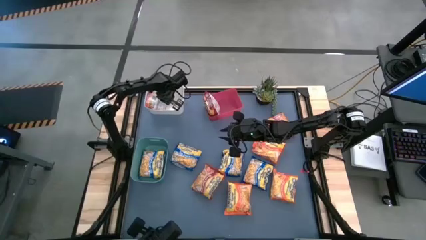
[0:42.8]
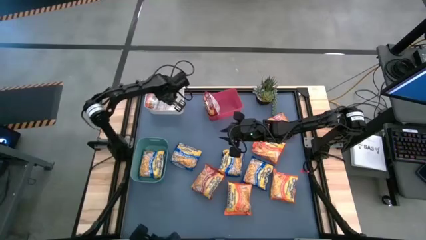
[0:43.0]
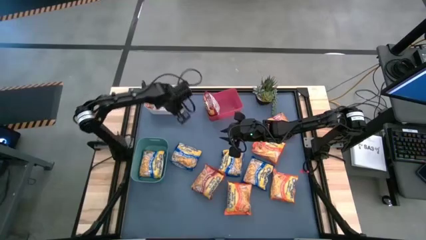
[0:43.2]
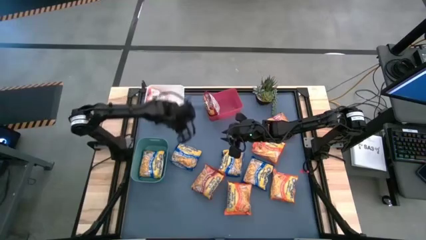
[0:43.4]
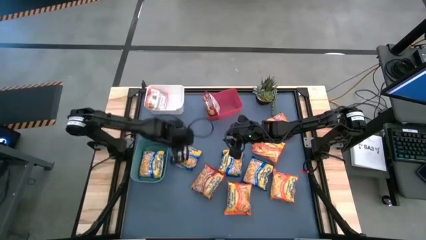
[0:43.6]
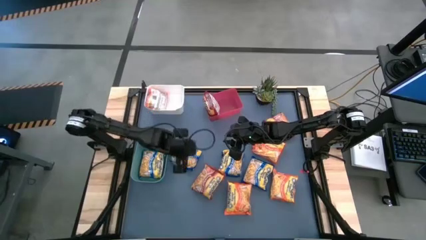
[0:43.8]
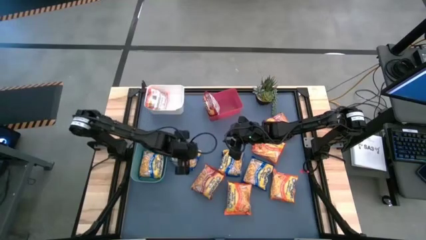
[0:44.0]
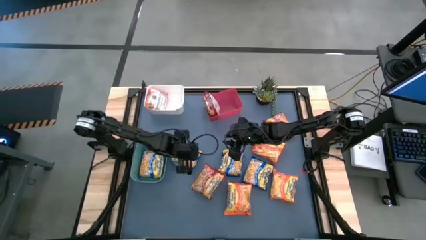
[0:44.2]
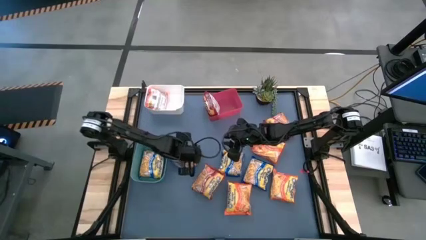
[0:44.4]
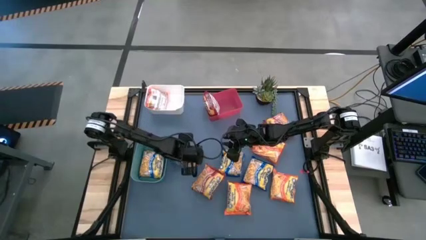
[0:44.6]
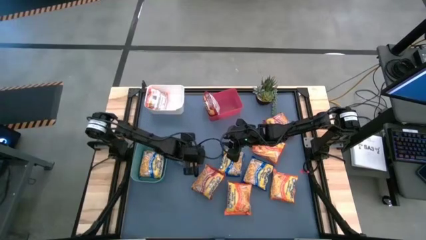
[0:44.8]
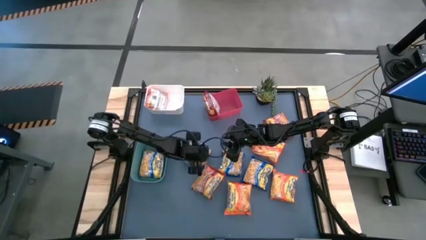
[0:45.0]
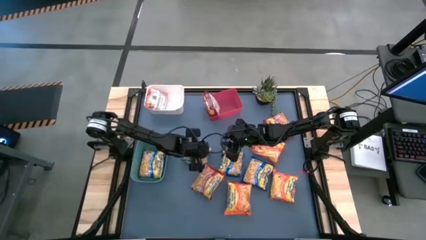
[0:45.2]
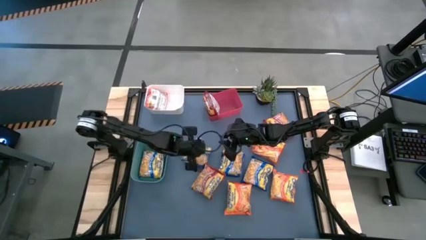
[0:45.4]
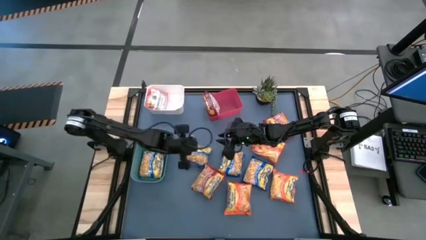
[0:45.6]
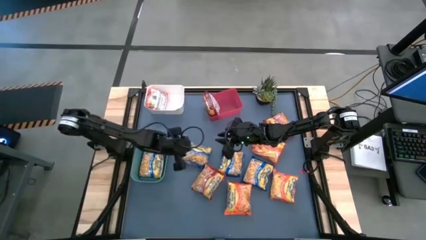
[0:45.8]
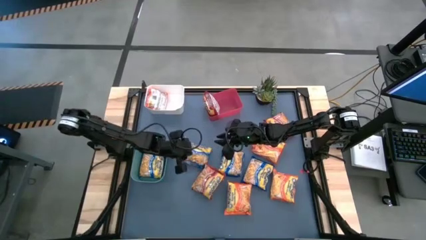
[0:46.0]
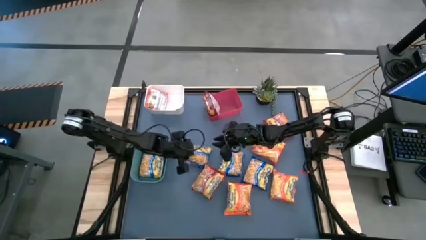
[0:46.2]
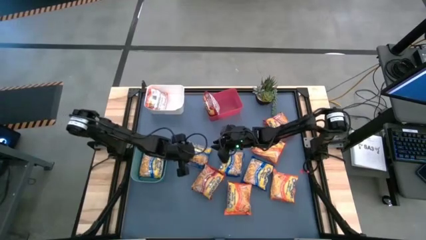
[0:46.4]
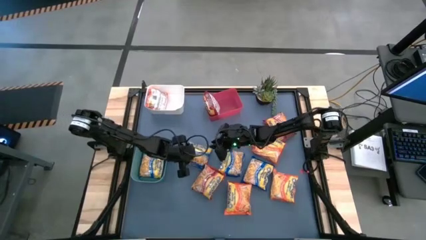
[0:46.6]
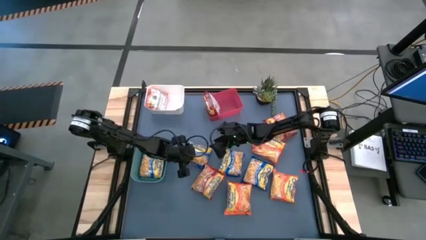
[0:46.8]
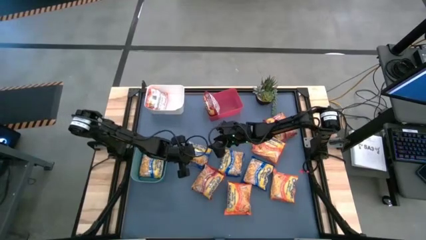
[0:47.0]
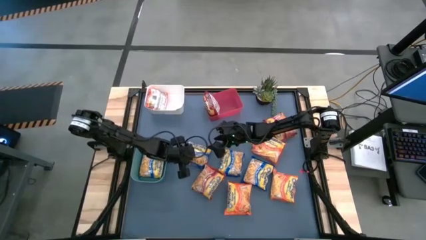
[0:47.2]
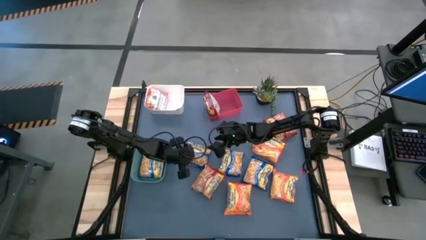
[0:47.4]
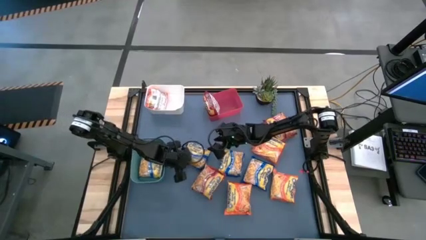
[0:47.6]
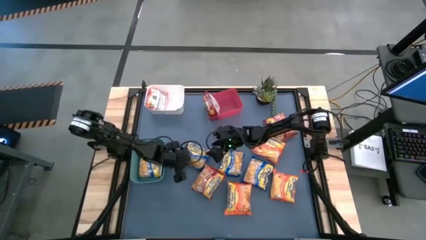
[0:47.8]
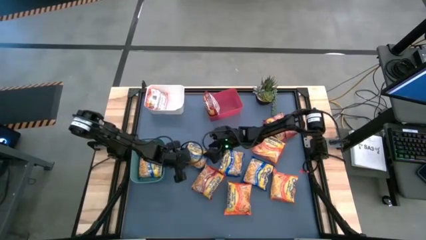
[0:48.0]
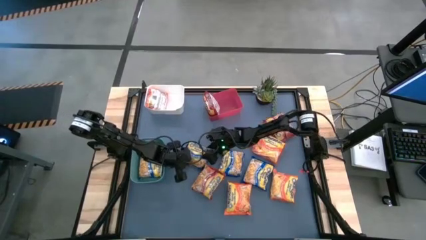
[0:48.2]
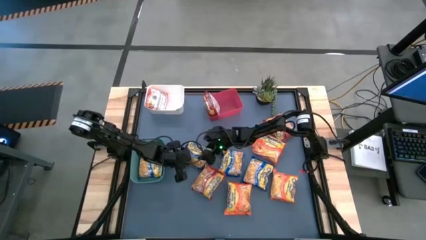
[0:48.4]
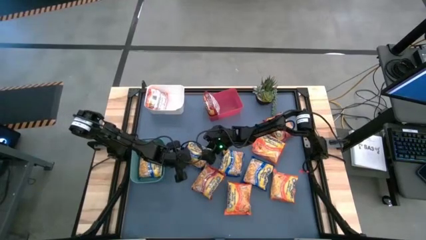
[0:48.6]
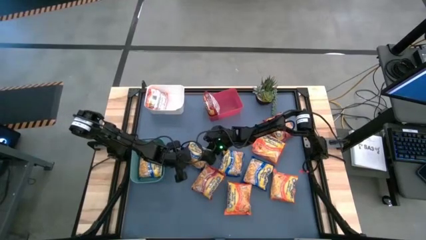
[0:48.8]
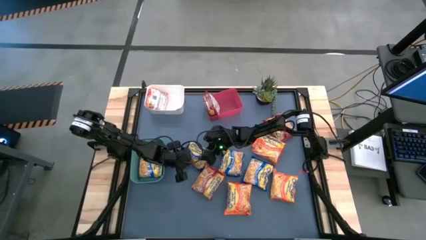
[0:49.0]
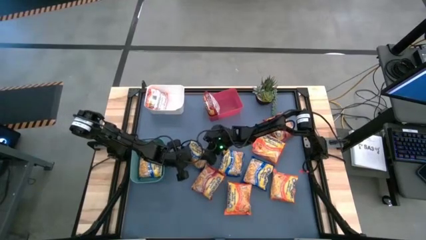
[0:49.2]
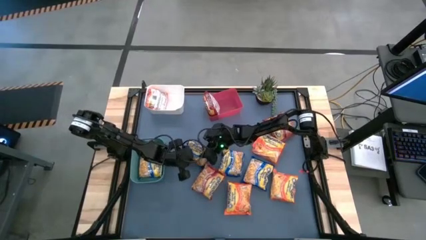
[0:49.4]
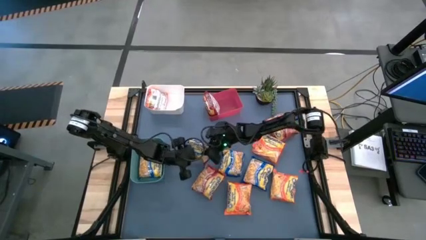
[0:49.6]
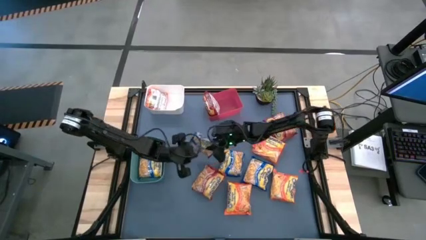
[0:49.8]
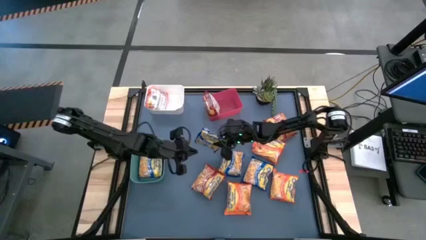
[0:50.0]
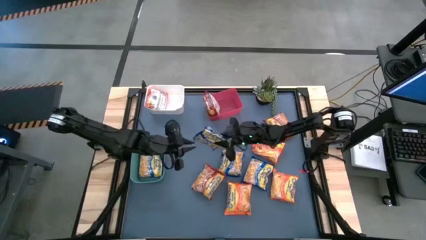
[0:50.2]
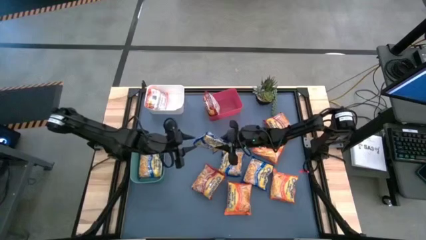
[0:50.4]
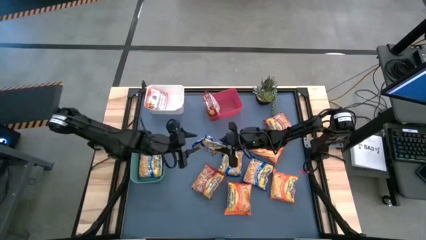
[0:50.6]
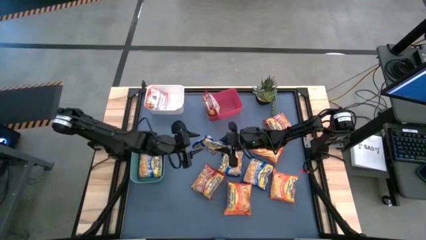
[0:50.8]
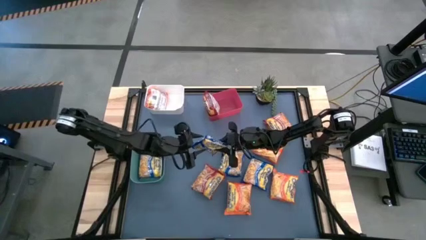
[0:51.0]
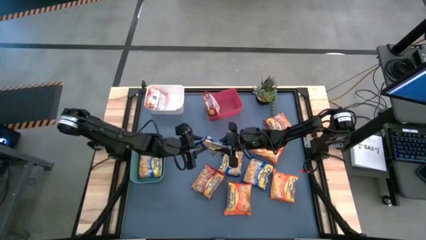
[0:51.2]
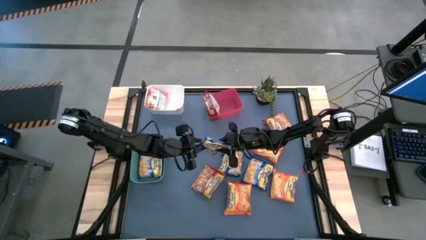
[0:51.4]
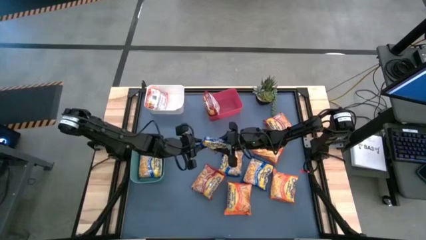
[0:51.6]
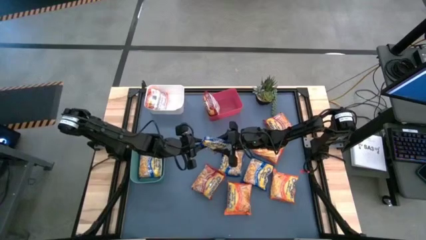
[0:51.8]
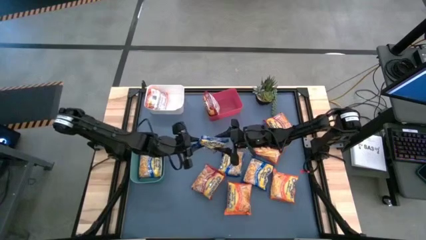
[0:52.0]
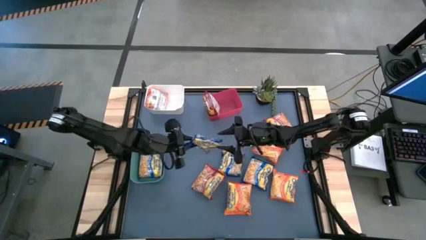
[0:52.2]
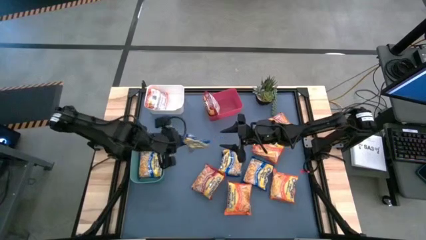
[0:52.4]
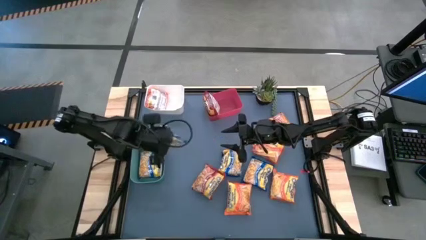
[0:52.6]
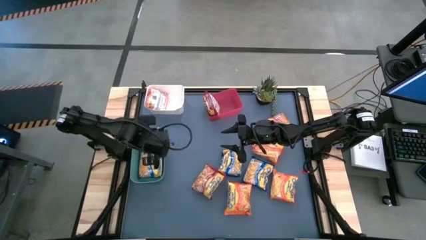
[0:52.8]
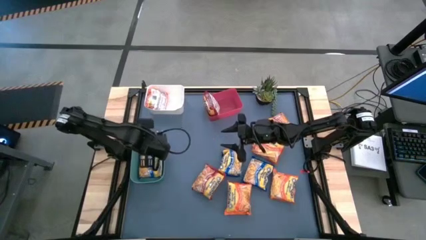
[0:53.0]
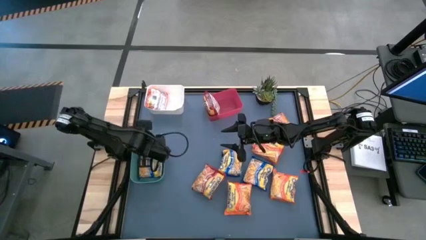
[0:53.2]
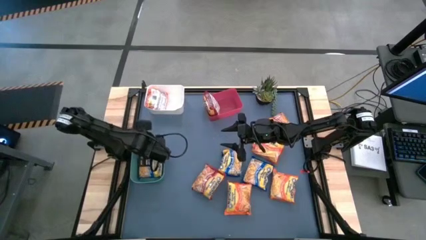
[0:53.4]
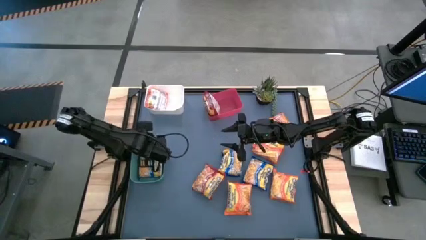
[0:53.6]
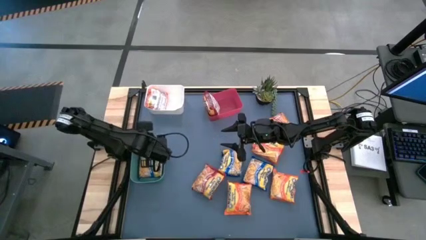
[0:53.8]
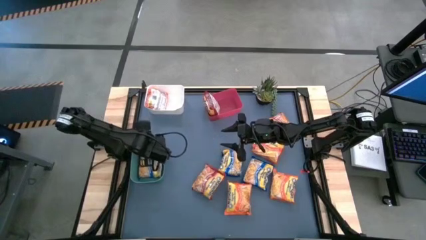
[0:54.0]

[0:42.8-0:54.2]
Task: Sort Maruchan noodles
Put the blue noodle pack into the green bin
